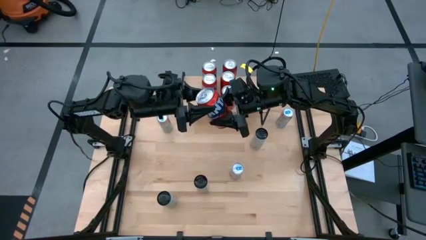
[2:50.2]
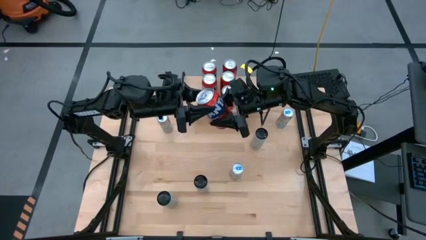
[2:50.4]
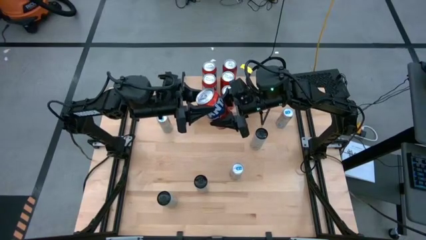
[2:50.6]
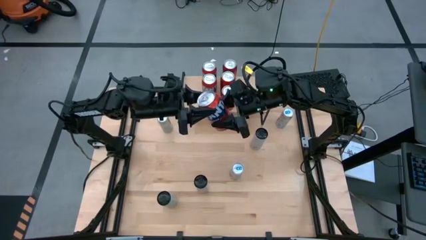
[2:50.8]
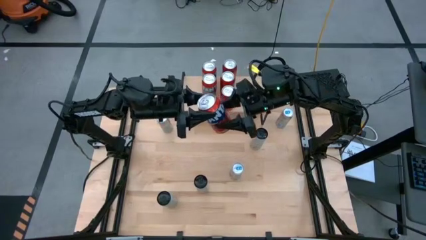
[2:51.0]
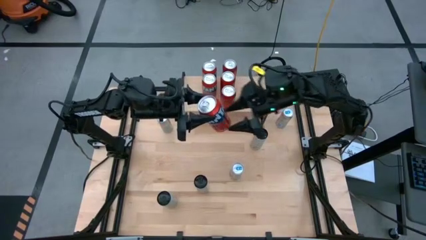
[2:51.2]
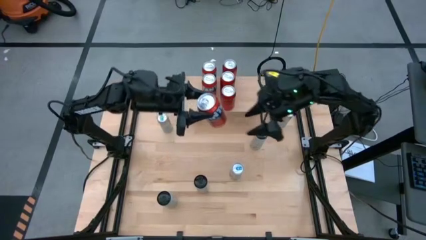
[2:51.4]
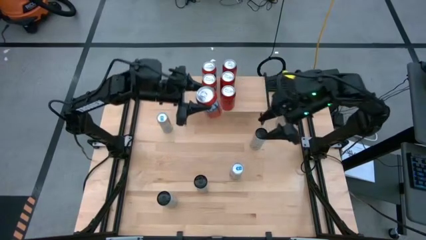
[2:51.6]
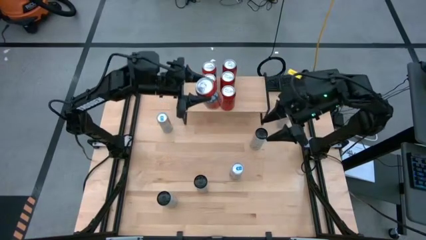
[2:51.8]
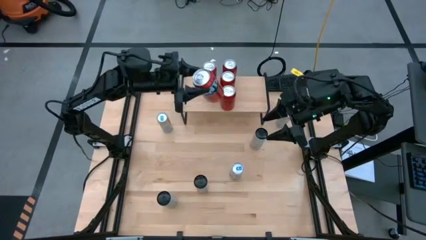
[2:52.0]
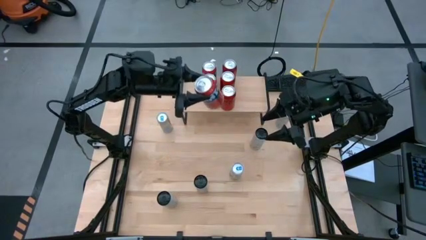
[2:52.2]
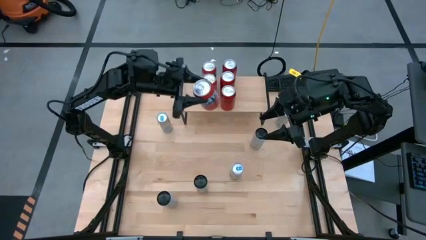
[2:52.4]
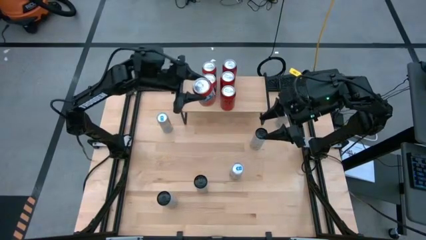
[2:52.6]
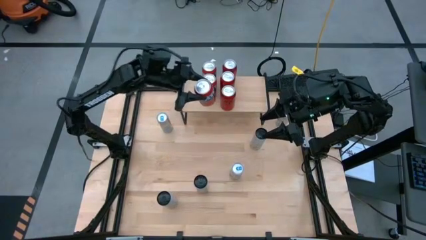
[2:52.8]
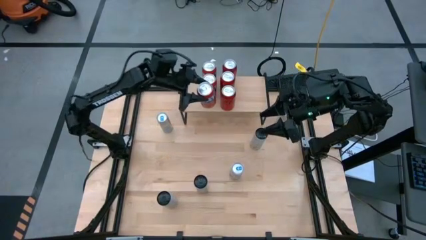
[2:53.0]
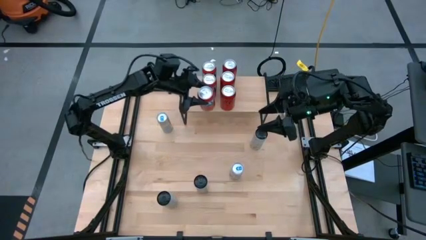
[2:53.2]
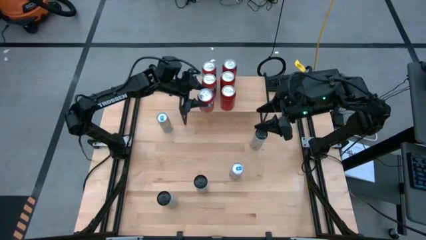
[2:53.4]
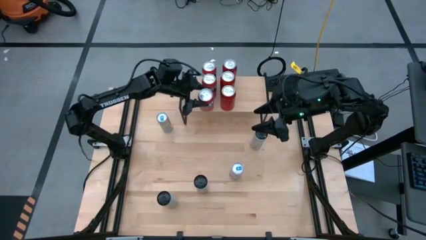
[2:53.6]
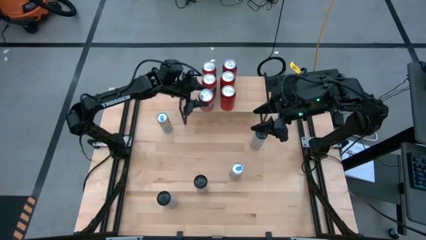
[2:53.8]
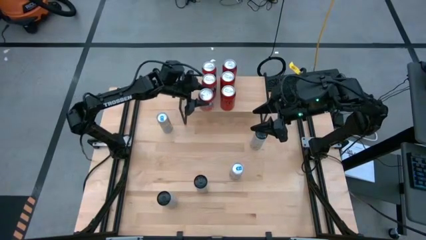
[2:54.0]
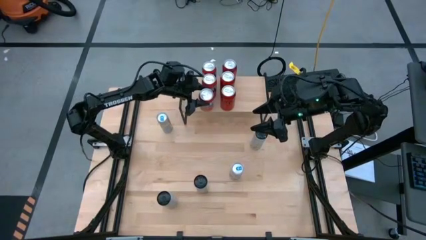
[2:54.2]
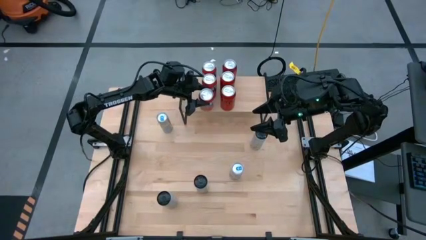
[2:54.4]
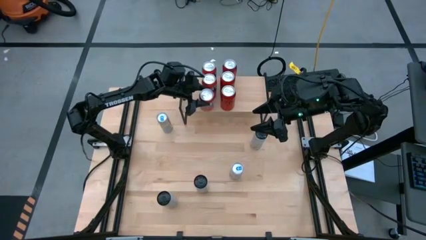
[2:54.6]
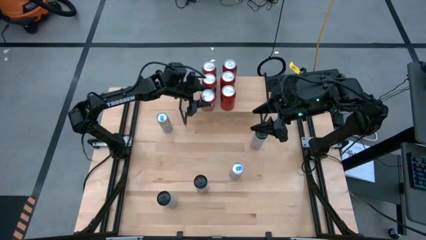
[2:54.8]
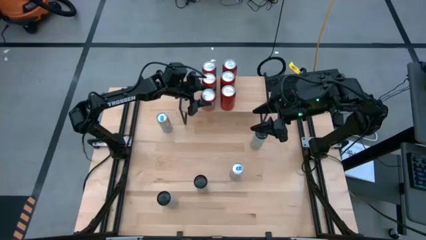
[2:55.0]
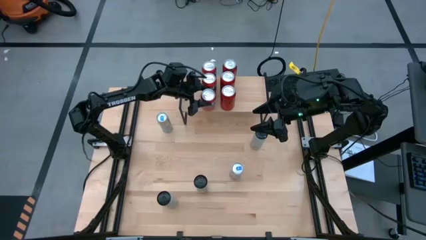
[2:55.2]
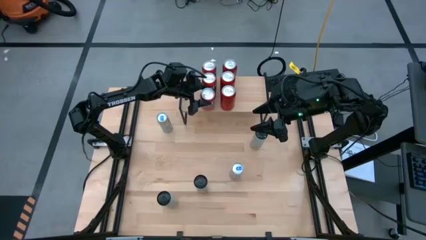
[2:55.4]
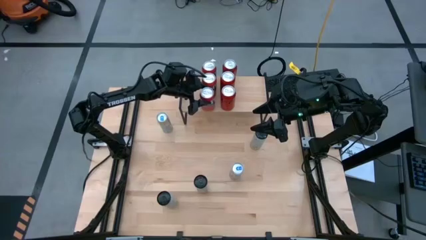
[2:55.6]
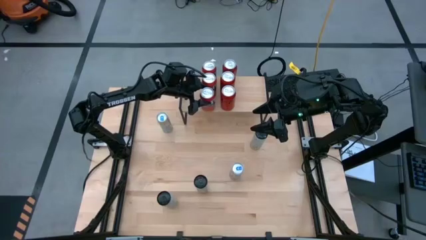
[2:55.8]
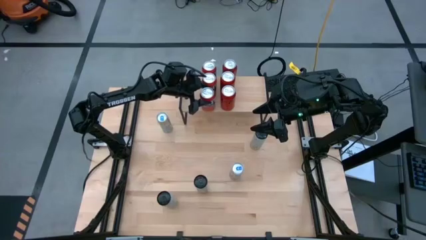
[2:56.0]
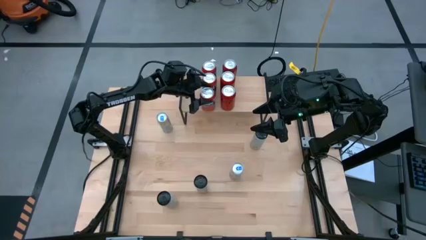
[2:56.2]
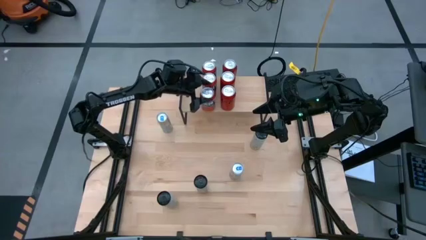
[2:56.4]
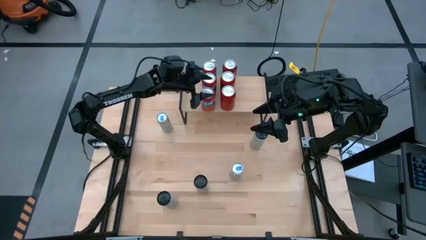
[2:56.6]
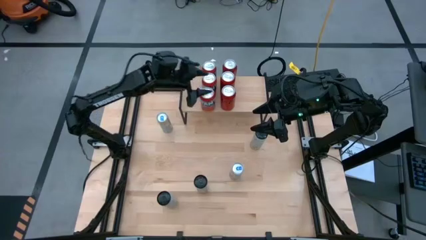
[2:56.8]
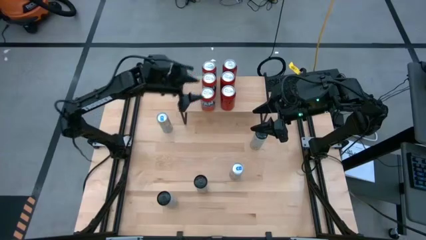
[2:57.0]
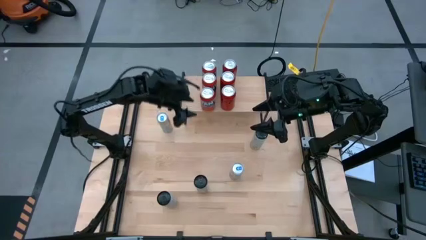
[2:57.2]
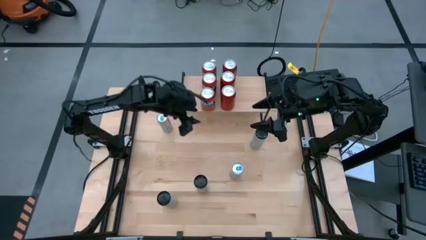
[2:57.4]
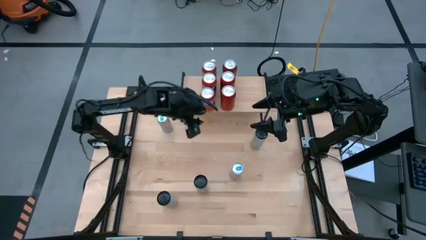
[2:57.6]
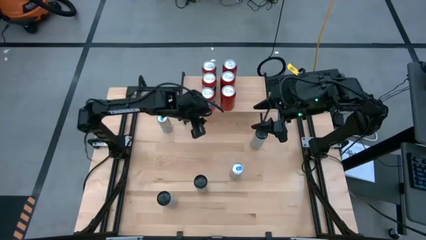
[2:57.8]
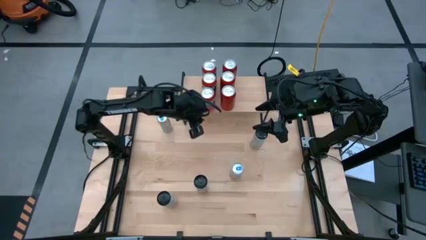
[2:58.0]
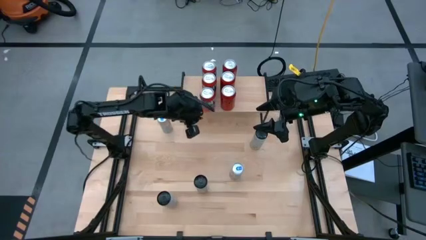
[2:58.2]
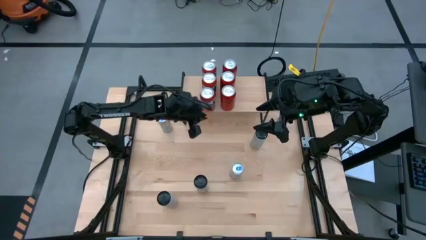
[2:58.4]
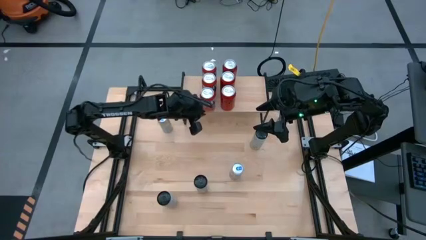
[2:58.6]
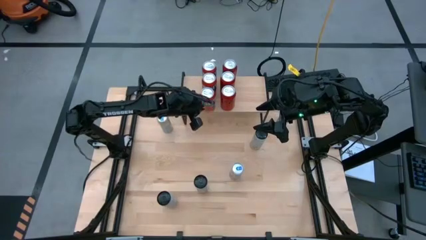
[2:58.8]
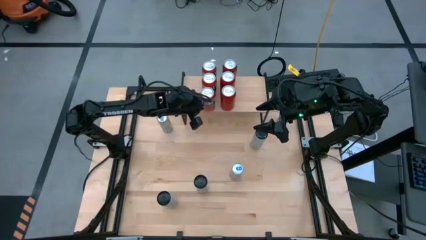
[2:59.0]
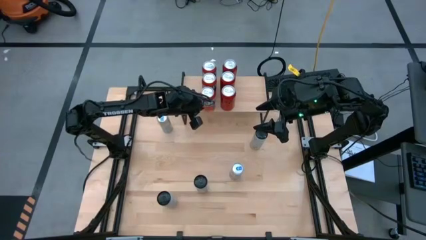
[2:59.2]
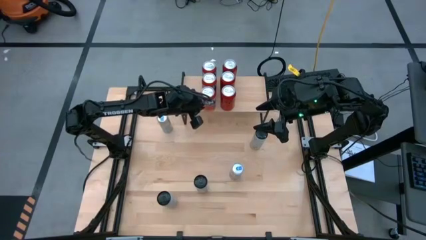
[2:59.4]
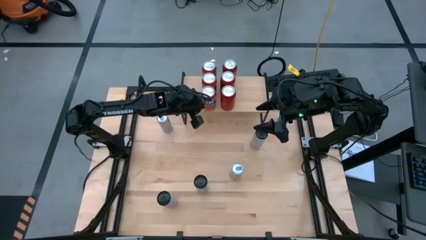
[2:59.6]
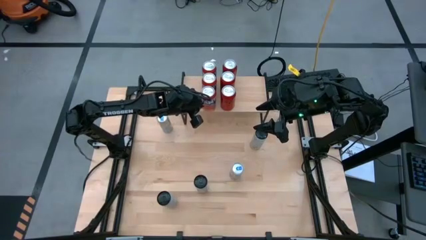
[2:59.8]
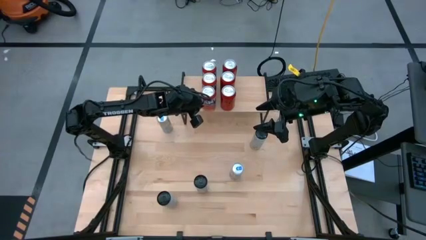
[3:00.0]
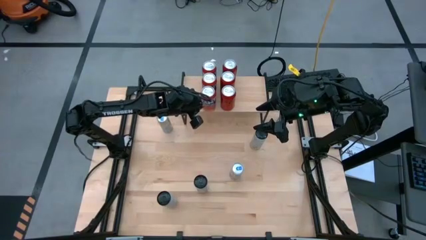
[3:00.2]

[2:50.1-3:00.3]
Task: Place canned beverage on shelf
Put the red soda can on the shelf aligned with the other red soda can

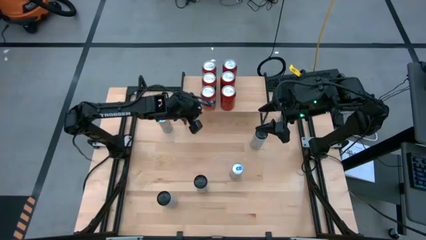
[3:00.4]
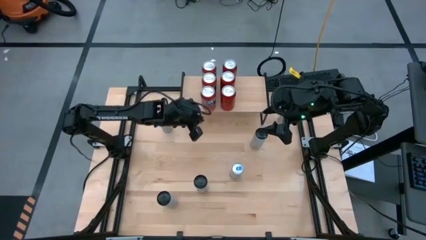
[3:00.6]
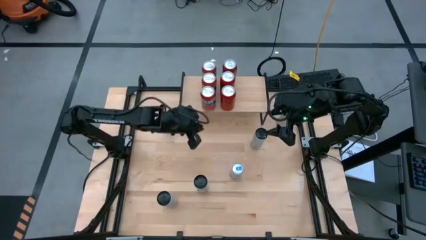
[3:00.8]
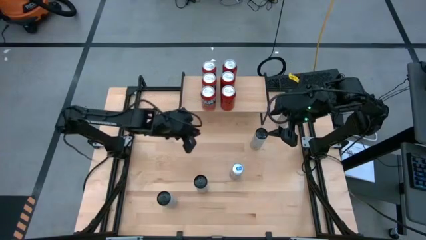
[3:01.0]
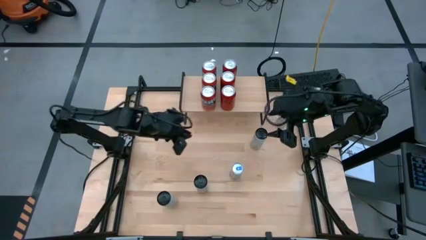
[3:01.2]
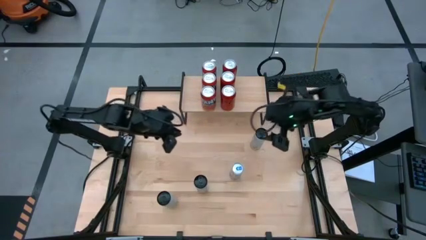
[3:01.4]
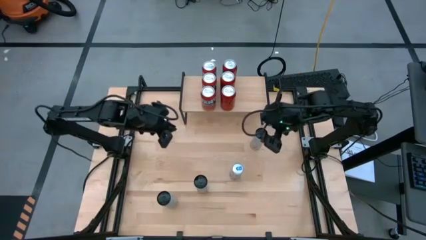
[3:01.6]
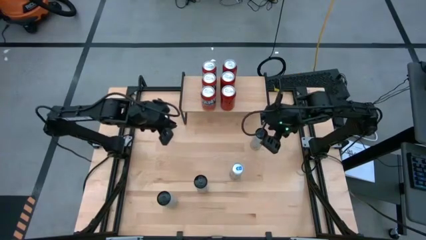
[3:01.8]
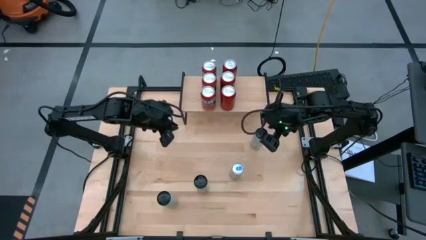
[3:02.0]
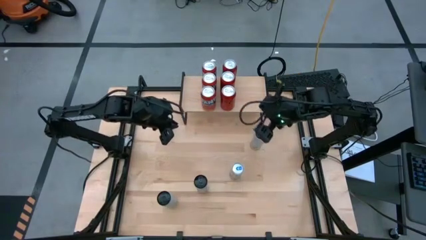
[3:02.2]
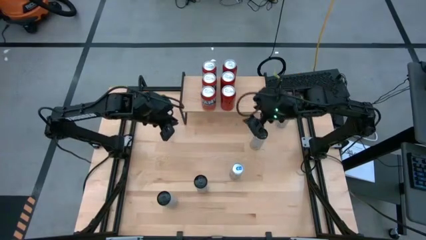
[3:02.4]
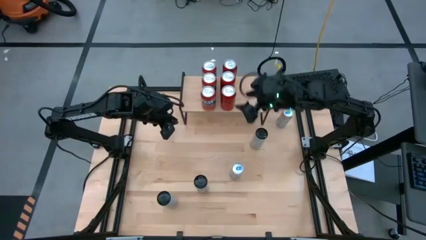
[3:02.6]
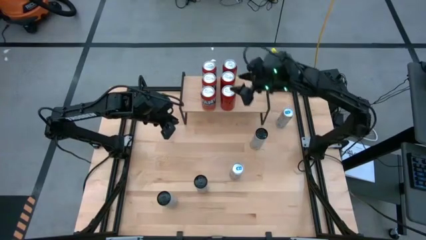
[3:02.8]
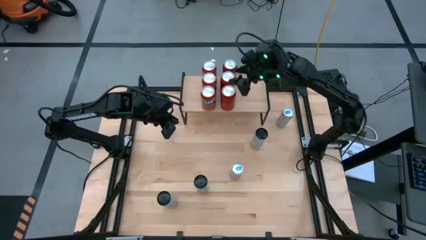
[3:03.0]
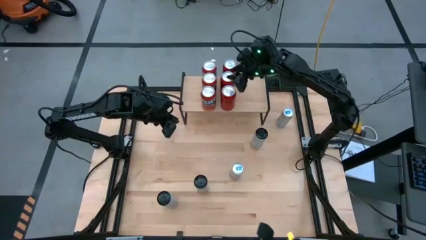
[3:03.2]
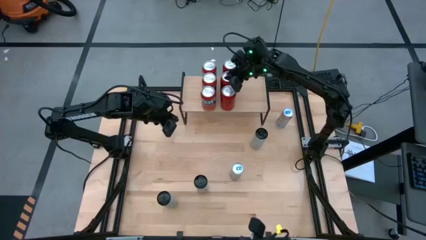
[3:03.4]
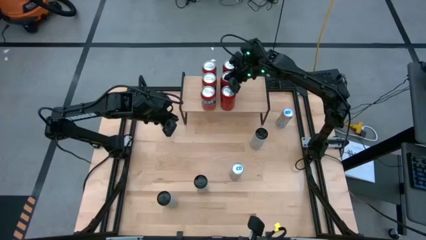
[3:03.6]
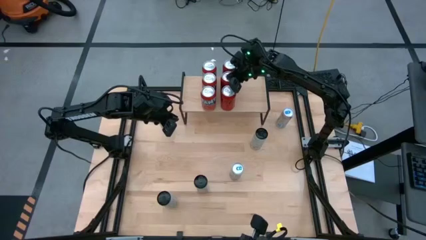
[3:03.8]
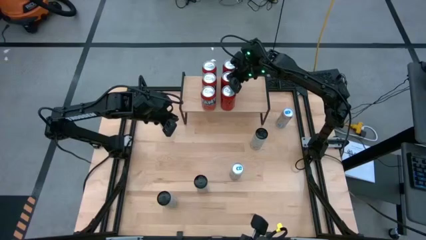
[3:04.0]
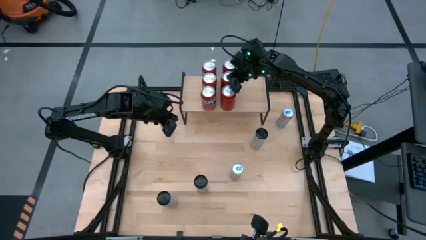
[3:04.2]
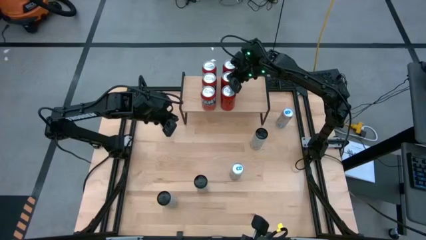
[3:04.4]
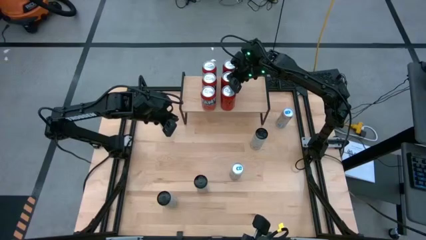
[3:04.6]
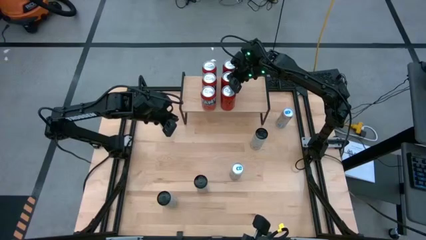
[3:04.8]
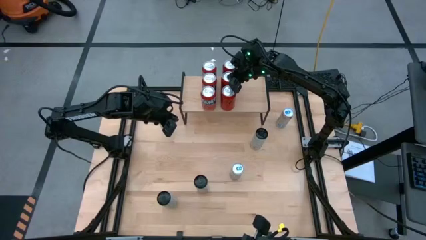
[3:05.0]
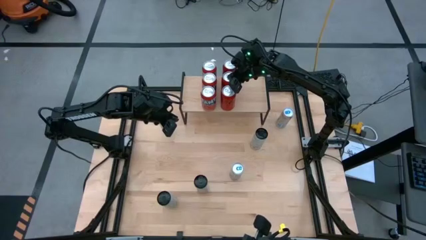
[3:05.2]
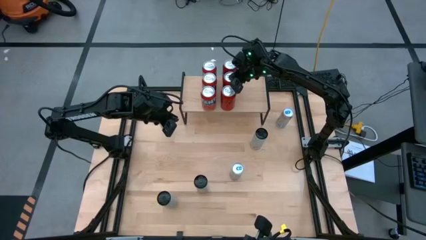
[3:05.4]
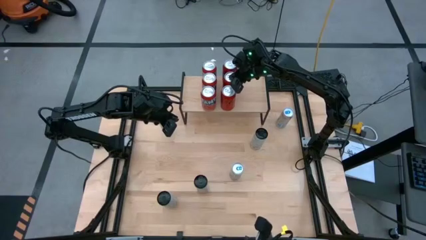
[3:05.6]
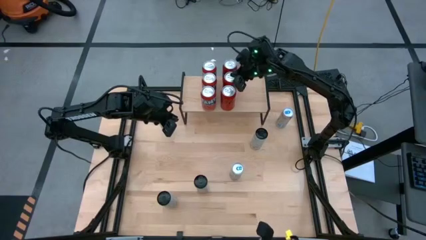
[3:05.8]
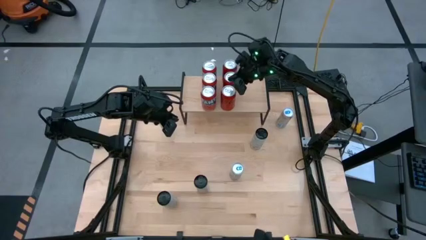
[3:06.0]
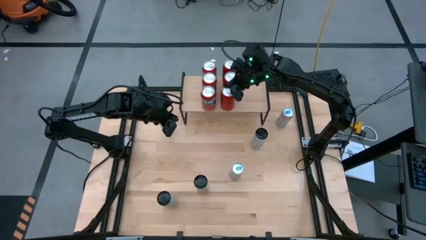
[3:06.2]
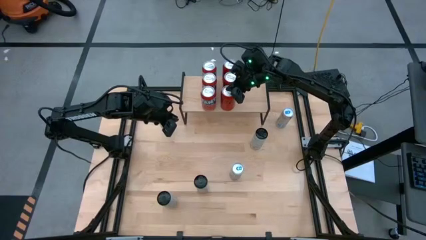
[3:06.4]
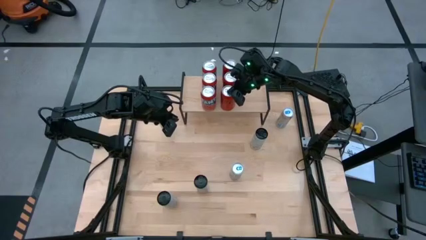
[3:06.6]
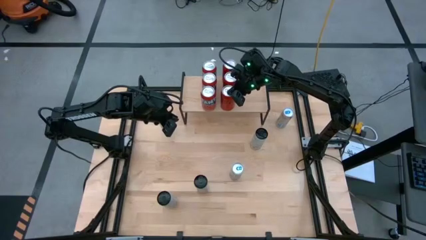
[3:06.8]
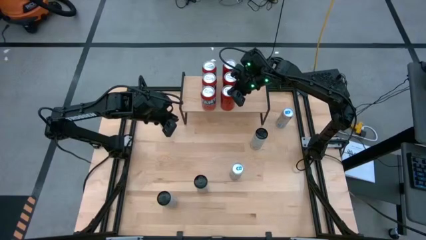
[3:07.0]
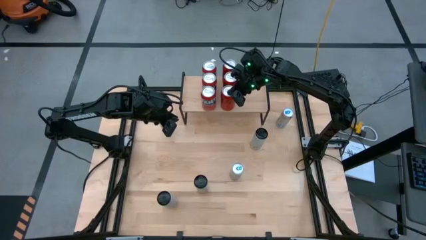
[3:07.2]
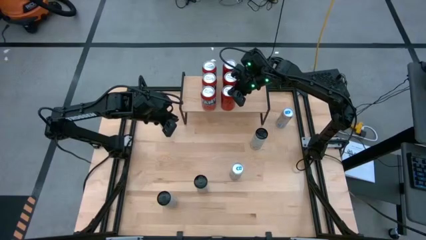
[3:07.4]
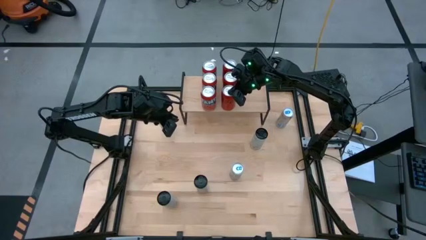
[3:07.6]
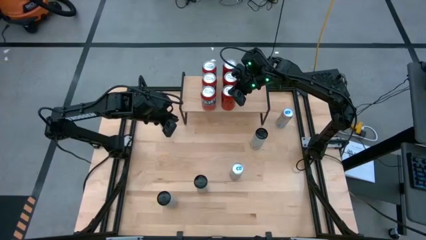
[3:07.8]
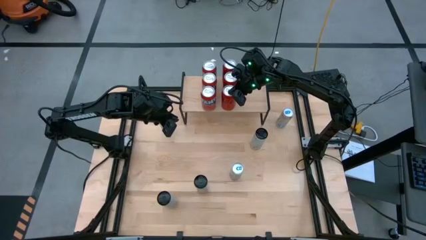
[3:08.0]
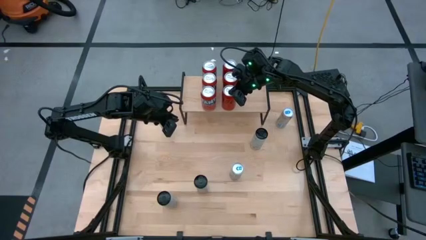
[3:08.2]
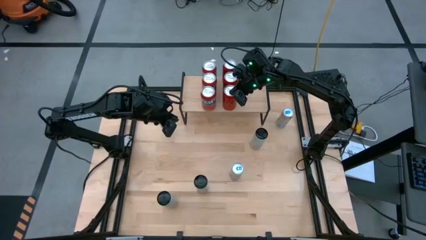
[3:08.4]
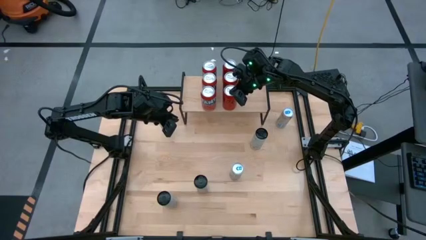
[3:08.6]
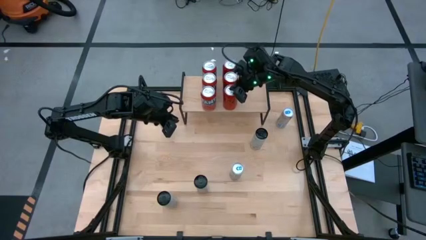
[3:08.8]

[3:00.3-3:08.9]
Adjust the red-black soda can on the shelf
